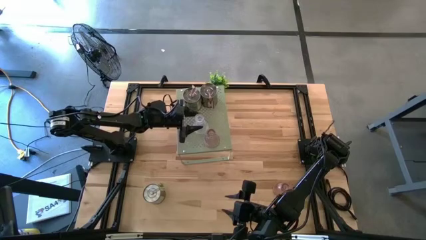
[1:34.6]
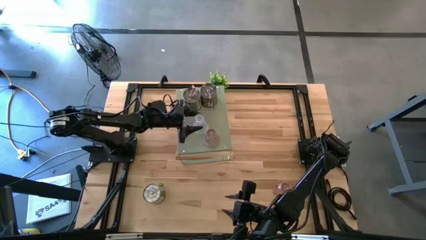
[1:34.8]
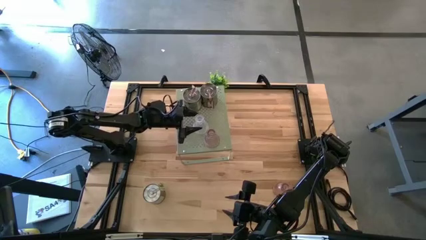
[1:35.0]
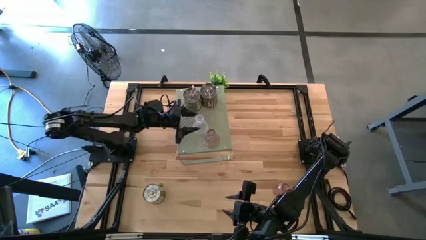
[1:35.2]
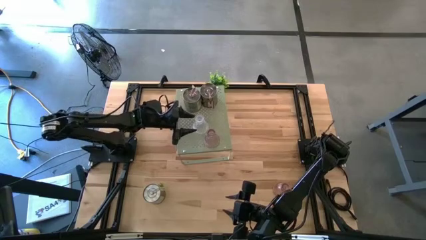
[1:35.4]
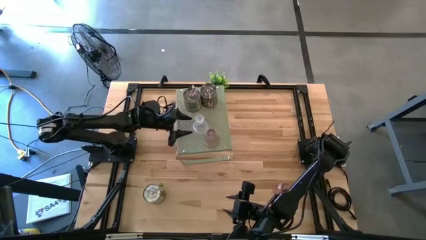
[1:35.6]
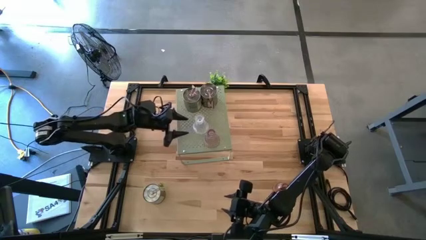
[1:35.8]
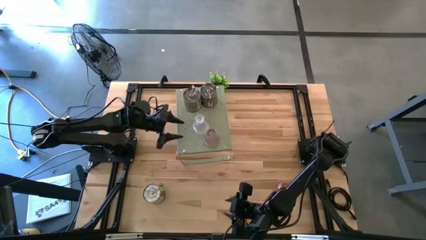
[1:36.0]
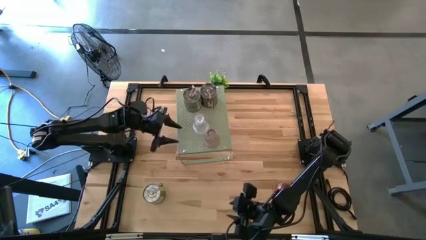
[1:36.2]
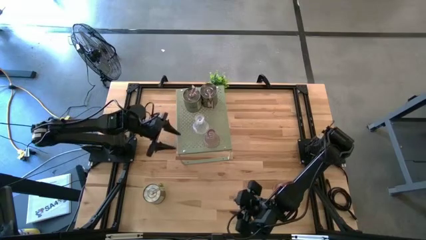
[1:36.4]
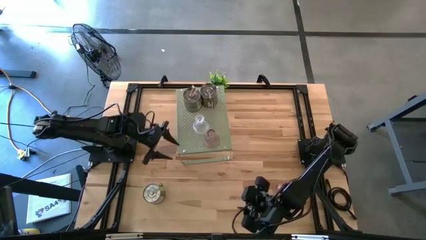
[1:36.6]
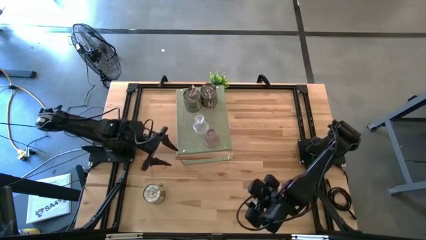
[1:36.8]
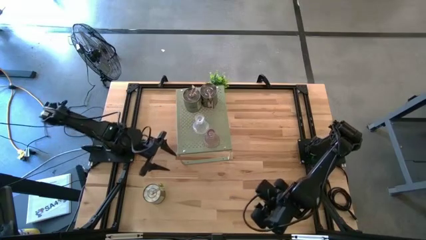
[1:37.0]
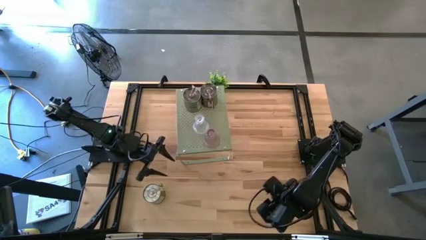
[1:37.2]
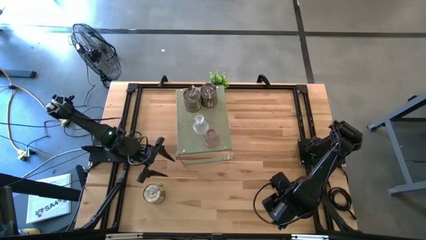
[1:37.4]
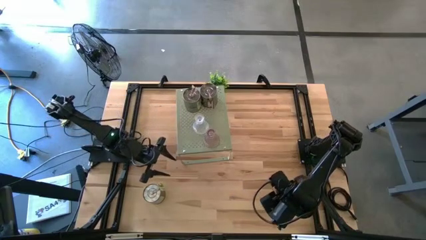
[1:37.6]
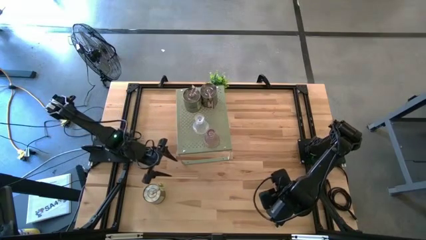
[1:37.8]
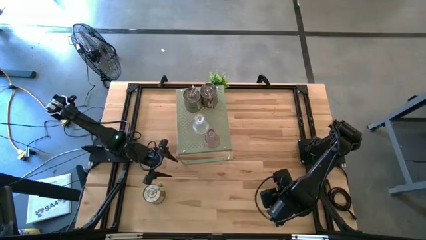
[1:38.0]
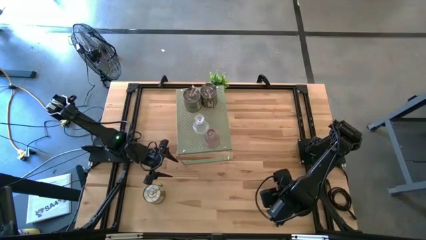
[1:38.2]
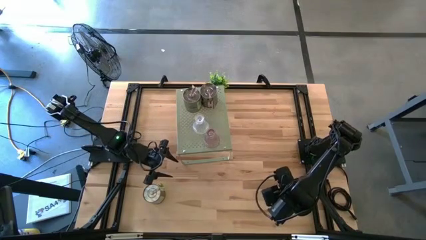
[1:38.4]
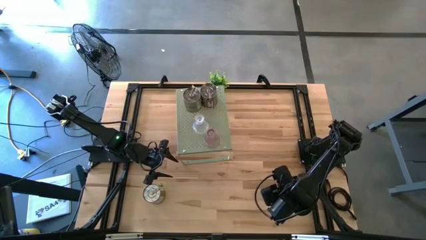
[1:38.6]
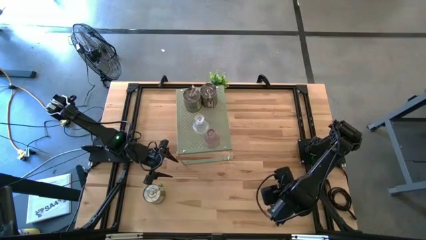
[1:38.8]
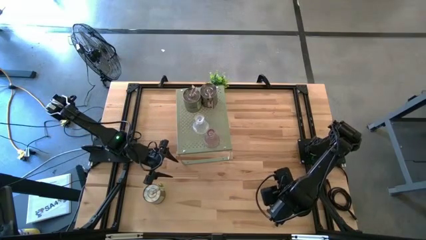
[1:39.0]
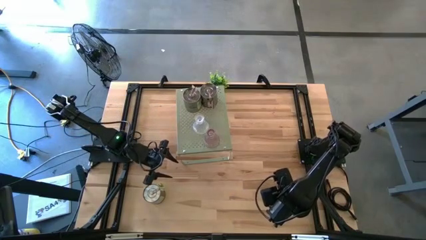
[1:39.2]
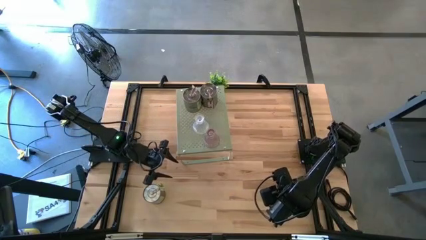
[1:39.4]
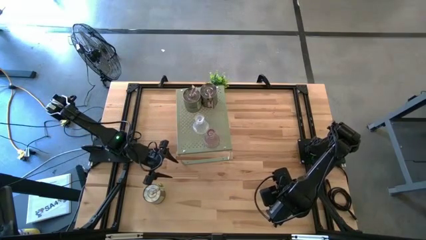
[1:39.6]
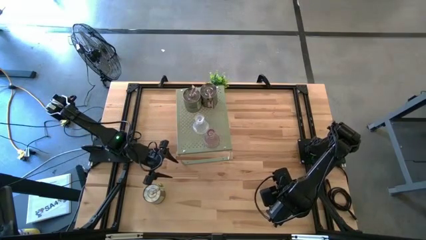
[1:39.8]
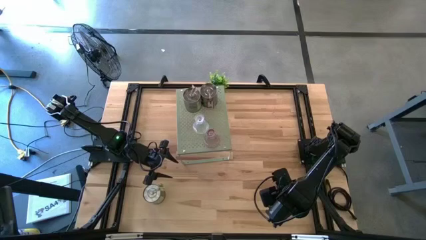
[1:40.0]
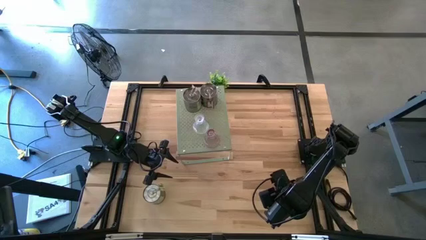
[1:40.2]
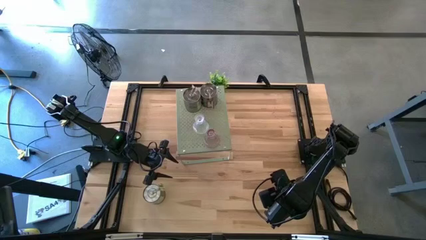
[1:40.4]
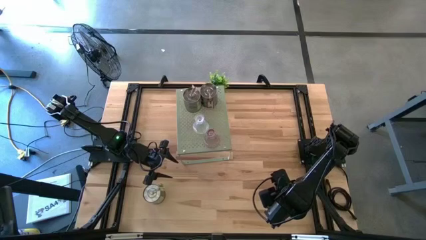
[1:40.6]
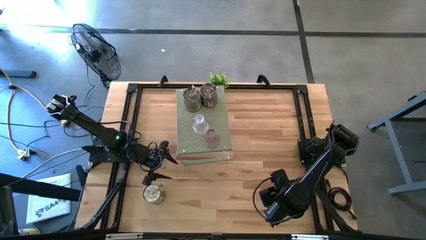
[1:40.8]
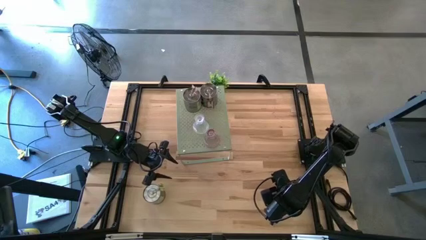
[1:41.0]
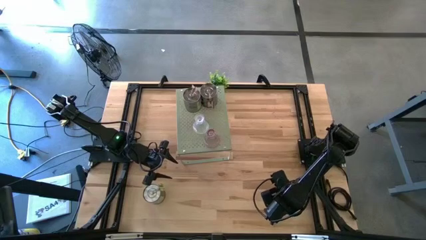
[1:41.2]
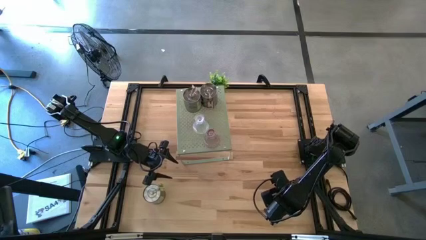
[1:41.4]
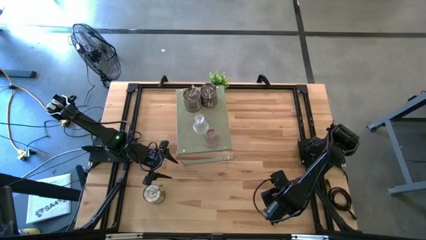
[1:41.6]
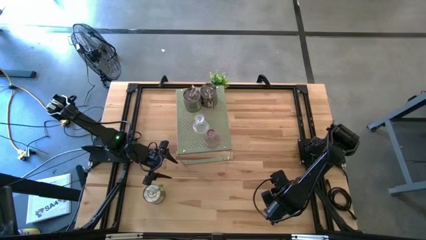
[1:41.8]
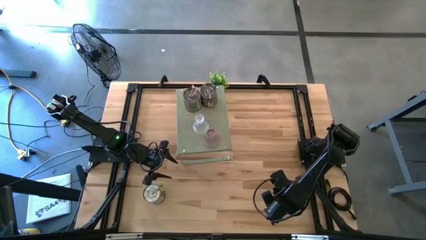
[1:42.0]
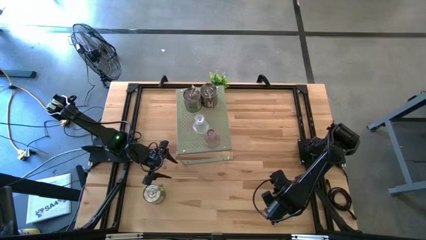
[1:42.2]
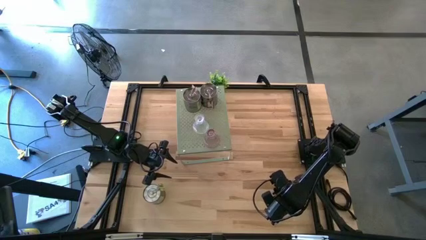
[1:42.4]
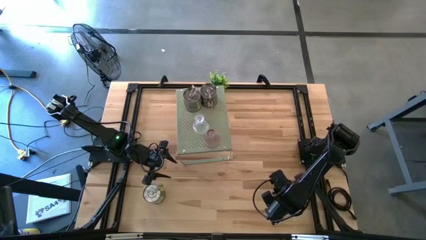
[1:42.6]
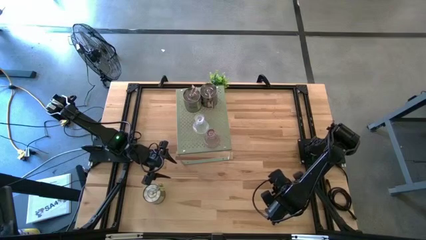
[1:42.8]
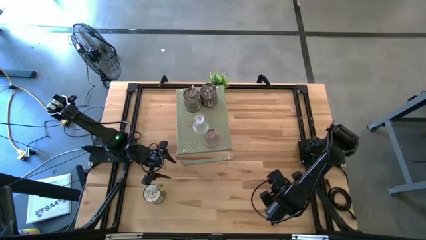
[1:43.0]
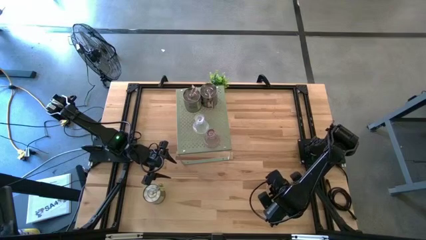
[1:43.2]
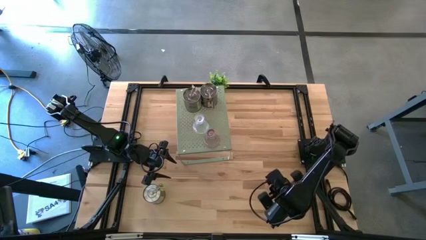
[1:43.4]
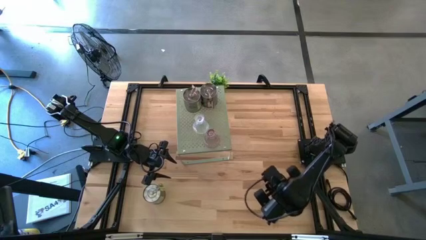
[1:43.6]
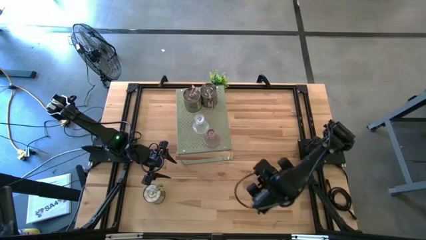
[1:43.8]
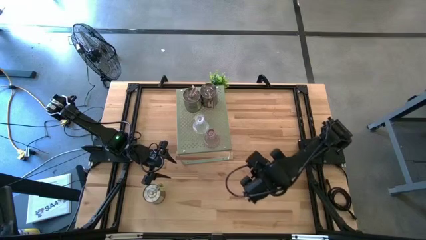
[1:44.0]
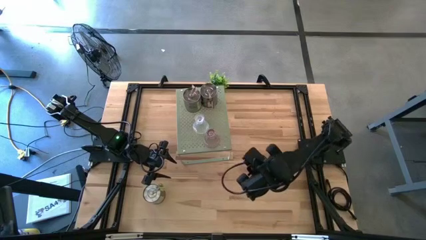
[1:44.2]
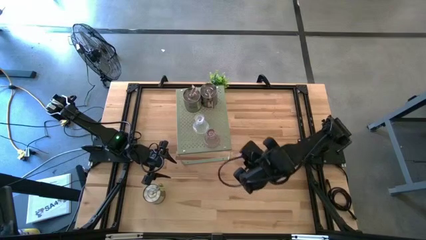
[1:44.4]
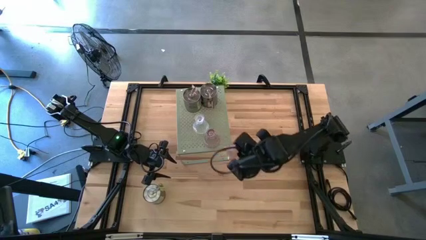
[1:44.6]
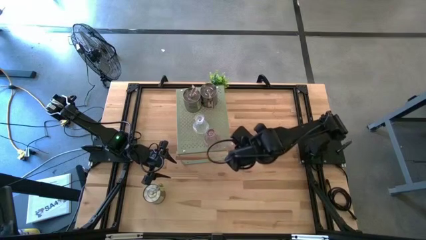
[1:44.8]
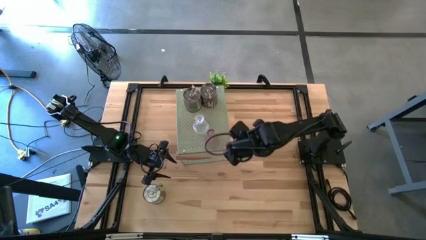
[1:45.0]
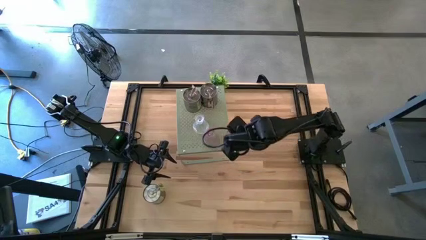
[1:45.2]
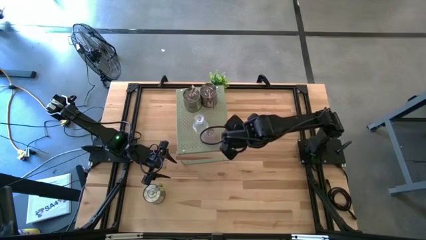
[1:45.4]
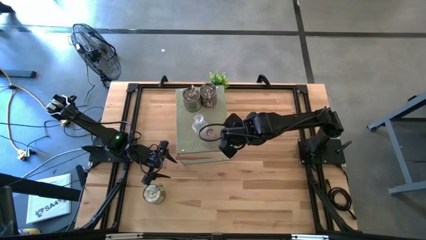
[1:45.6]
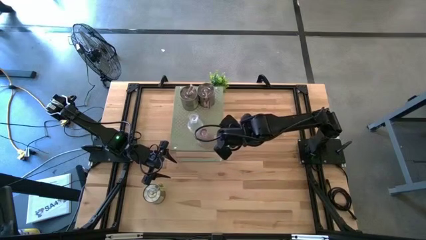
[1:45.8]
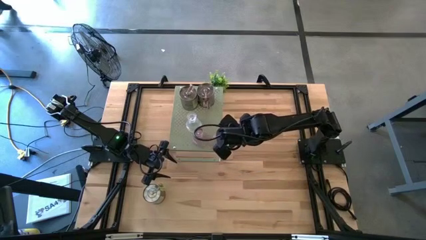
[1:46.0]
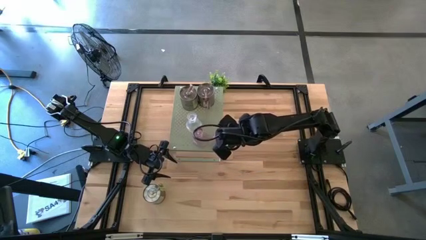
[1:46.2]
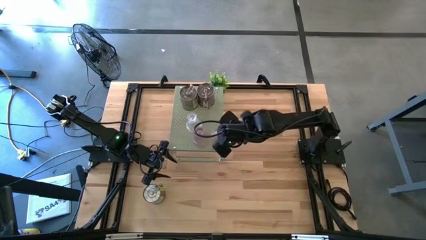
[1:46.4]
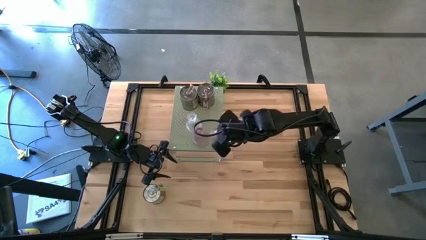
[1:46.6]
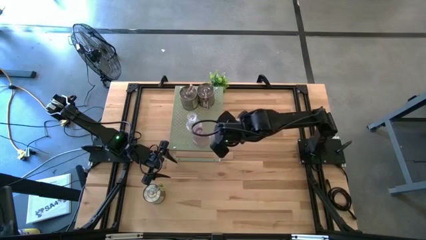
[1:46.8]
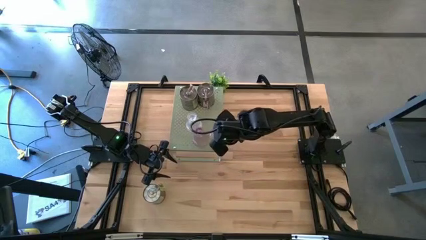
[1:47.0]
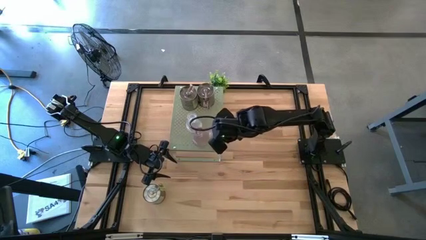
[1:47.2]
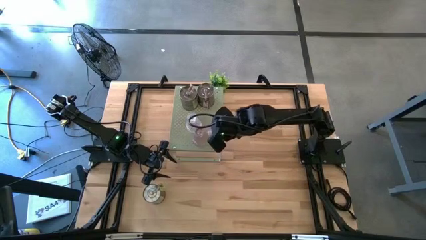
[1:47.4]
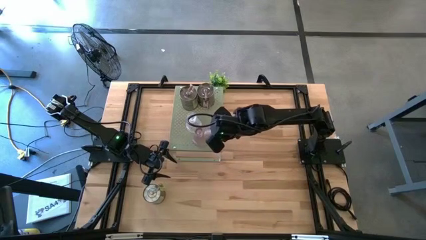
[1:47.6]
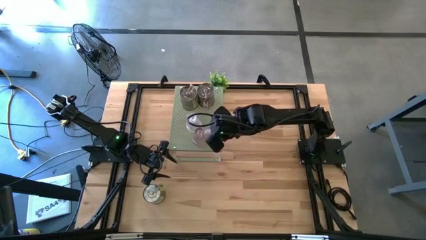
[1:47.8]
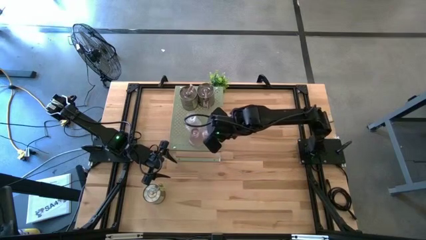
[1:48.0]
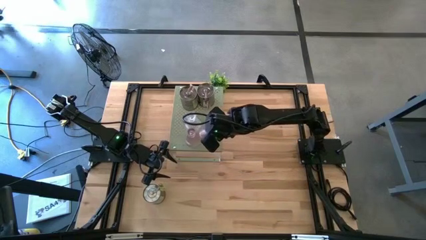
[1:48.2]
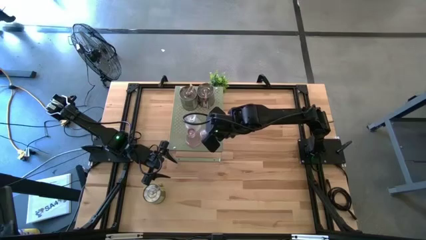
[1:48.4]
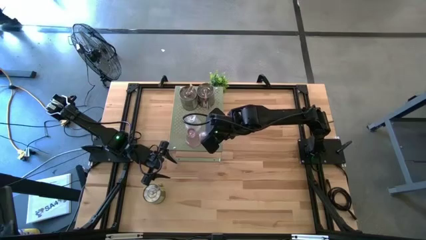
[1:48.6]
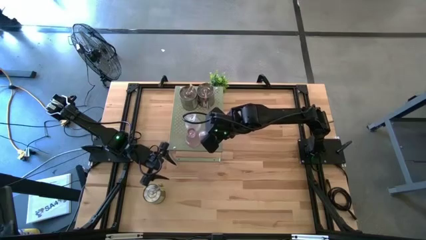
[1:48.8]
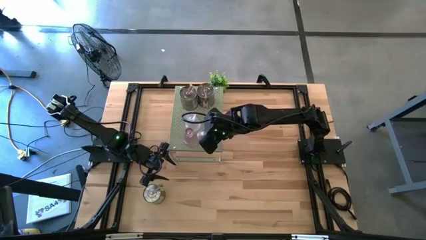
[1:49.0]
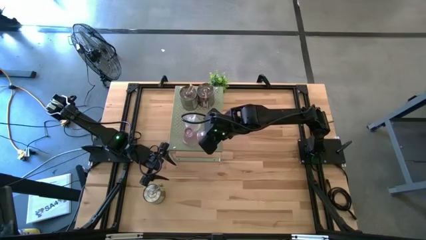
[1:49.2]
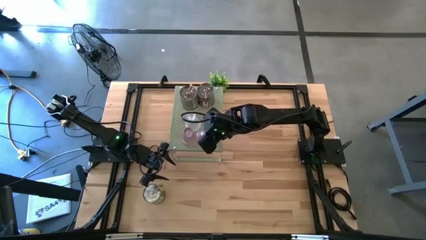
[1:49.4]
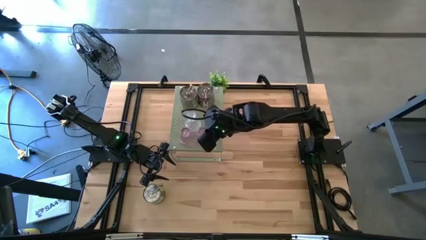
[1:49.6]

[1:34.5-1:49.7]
Task: Pick & Place candle stick holders
Put the pink candle holder on the shelf

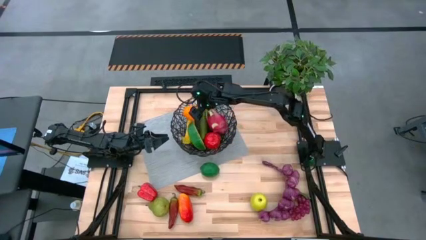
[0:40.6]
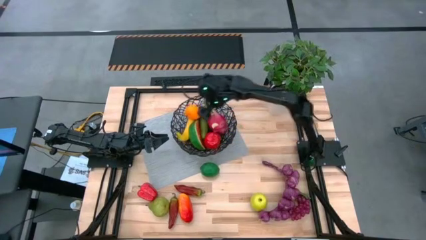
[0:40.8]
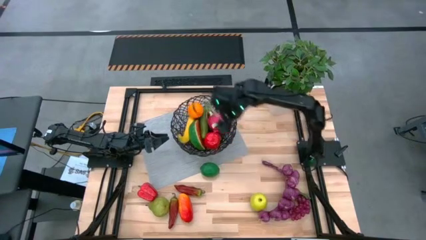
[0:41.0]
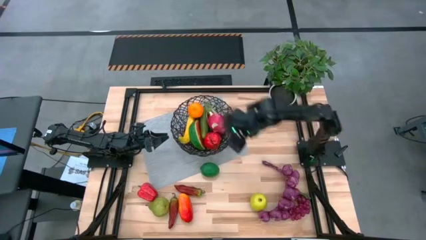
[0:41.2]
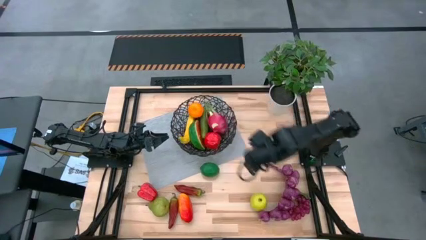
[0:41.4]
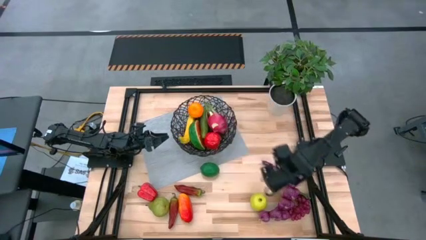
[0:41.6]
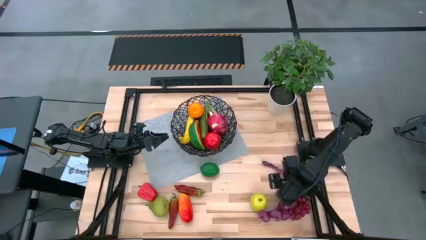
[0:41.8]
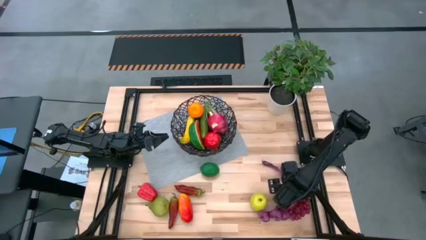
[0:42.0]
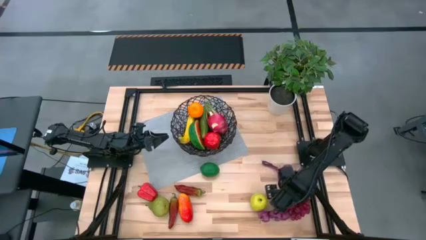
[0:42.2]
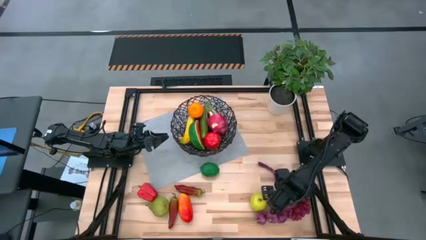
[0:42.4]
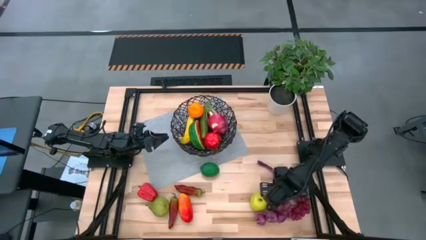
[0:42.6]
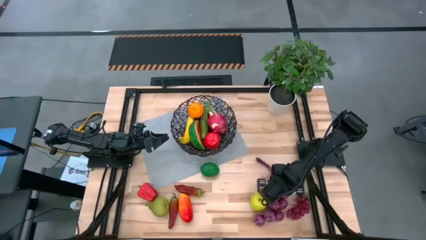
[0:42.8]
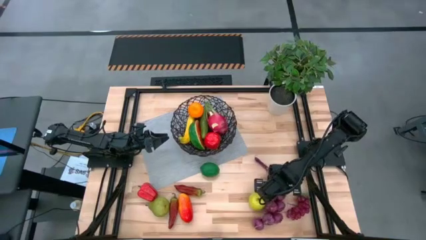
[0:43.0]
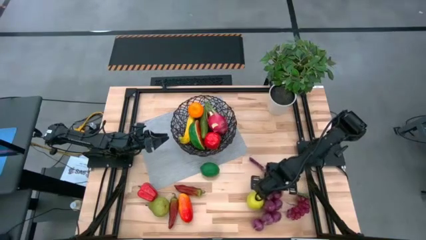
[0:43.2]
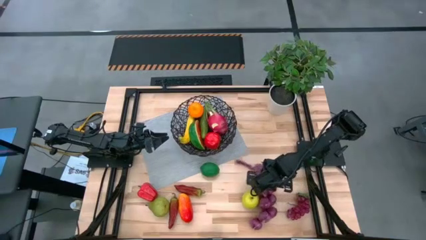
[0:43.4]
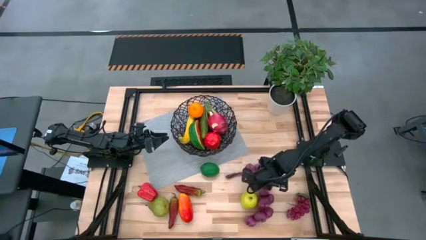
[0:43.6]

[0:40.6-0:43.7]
Task: Build produce basket
Put the onions into the wire basket
